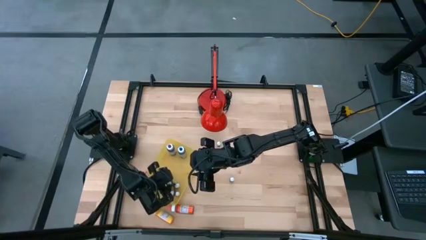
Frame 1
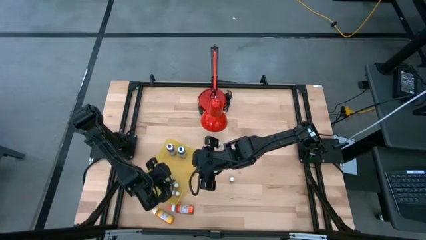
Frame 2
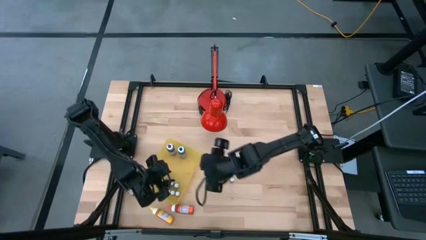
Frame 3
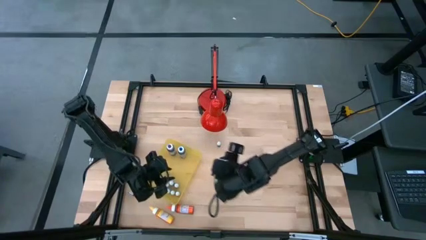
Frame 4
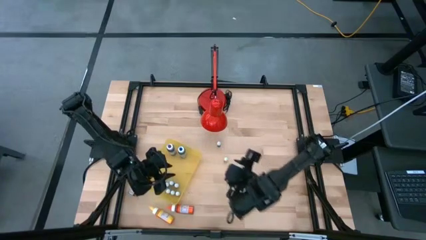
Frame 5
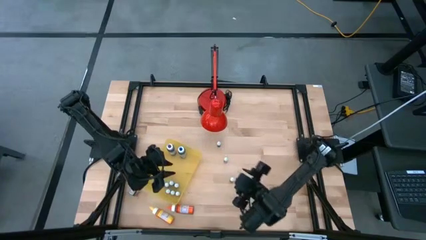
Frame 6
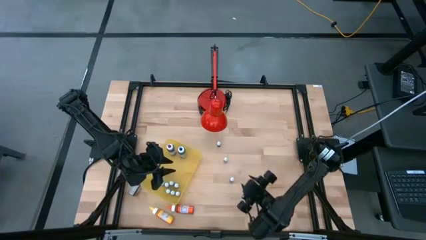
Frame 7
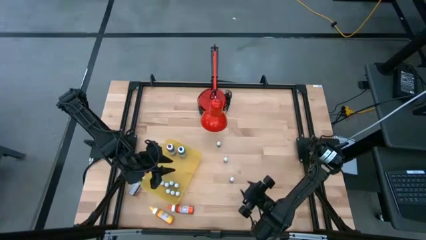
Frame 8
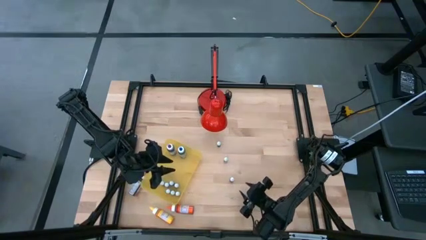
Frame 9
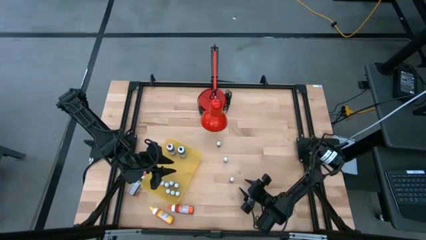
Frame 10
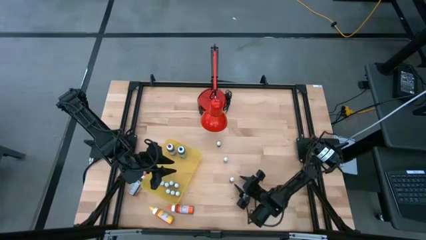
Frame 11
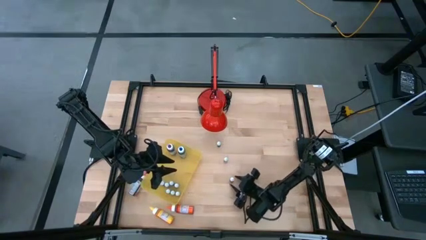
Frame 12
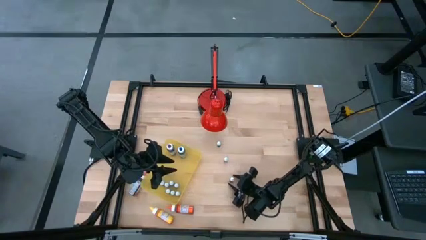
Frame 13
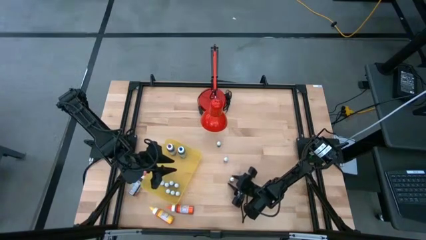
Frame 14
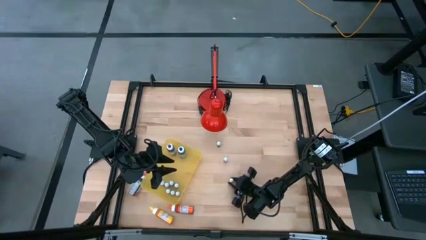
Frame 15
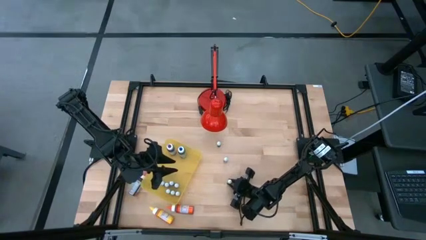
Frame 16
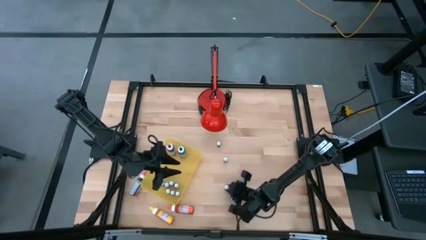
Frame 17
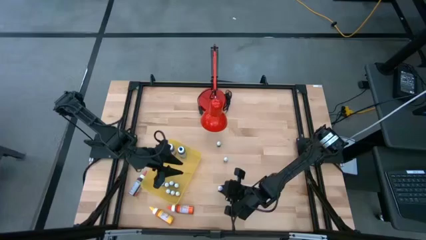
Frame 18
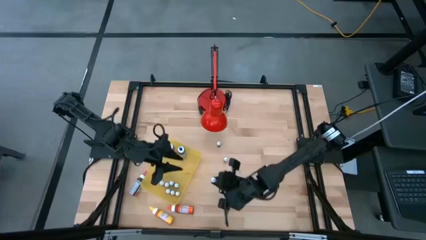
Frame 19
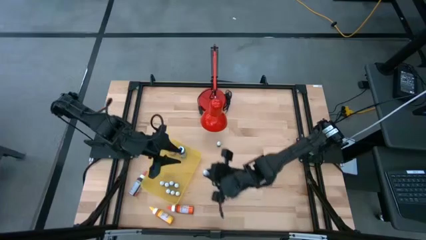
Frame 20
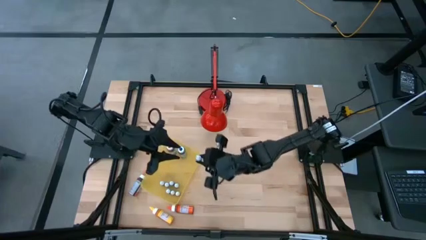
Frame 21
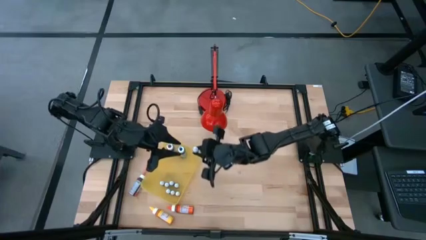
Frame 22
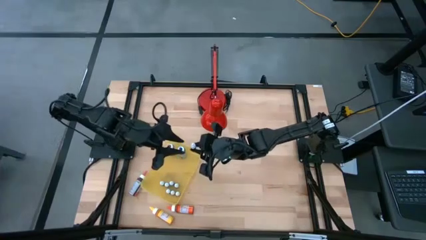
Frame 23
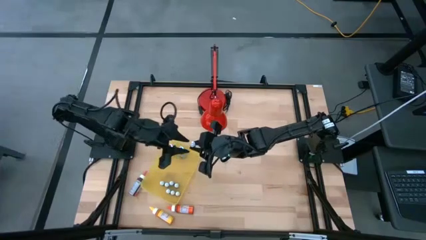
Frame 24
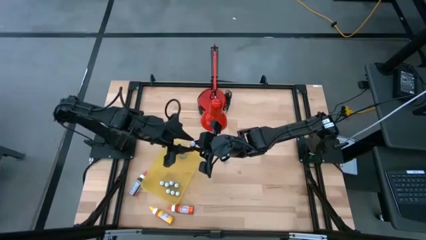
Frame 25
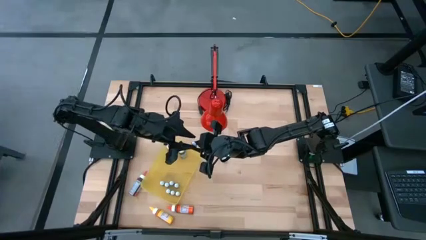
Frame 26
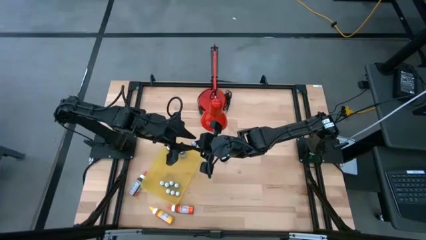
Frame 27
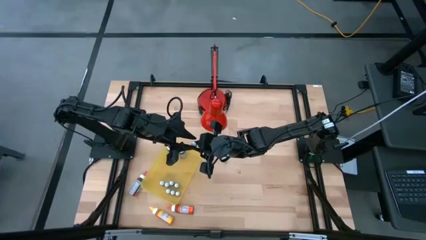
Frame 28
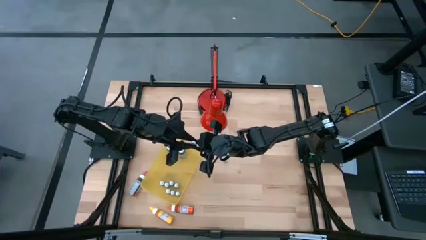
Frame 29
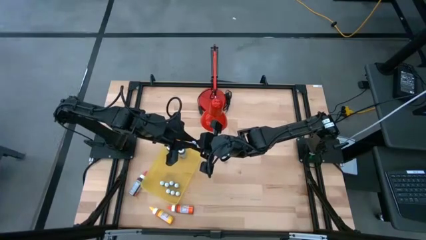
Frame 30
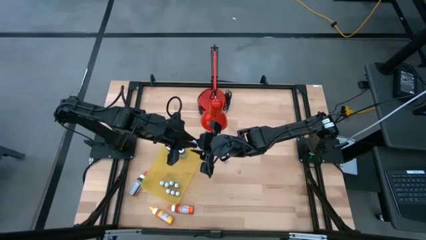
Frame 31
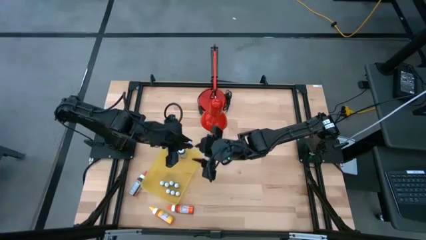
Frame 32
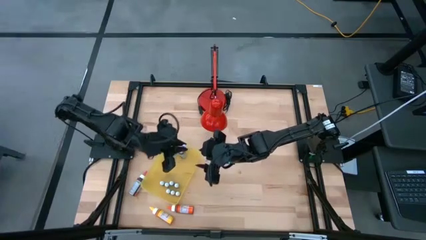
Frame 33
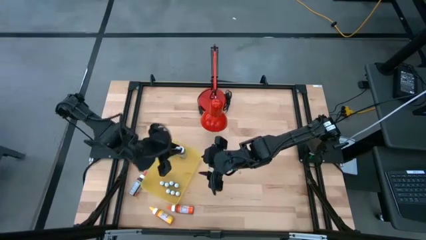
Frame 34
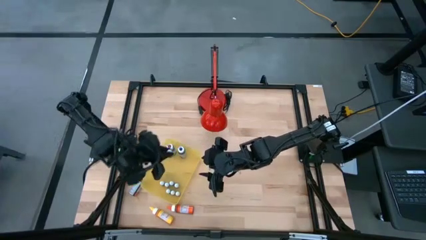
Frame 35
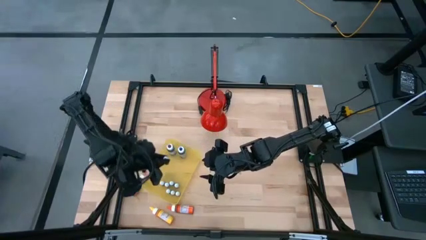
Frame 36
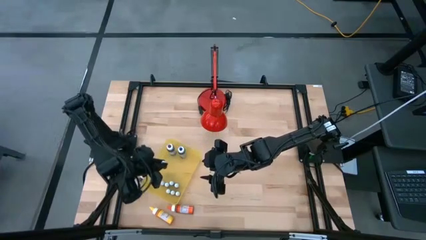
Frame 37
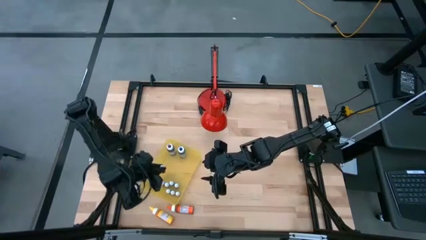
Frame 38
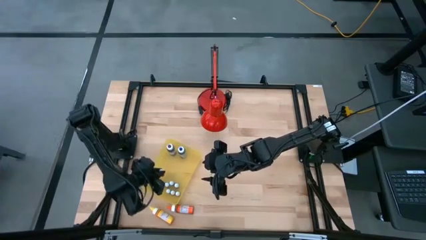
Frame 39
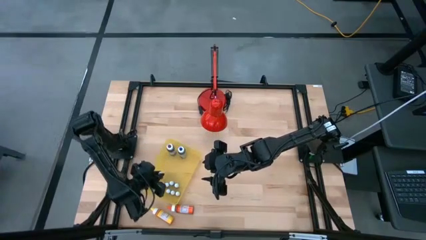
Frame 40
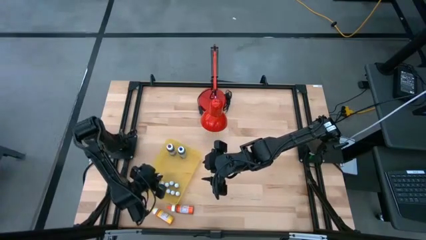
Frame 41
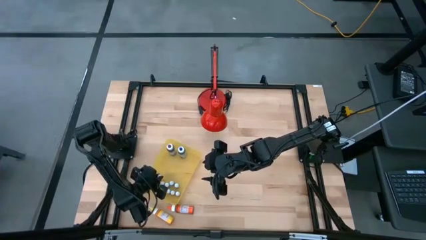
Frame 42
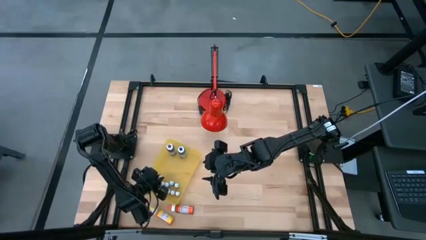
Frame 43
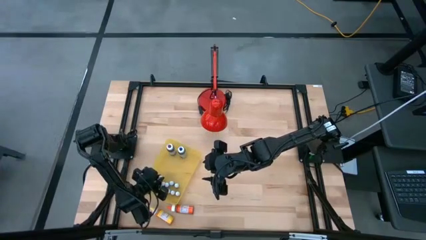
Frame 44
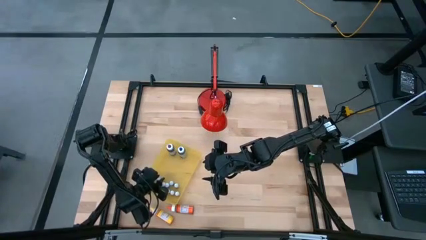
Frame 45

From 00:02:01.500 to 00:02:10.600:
Task: Pick & Place food coloring
Put the small red food coloring bottle into the yellow bin

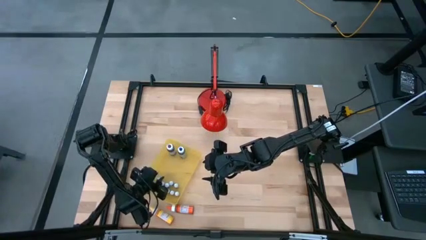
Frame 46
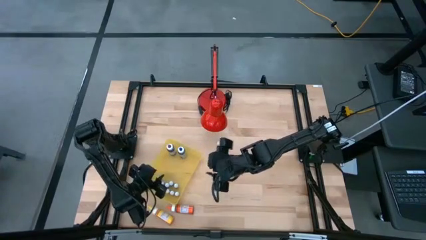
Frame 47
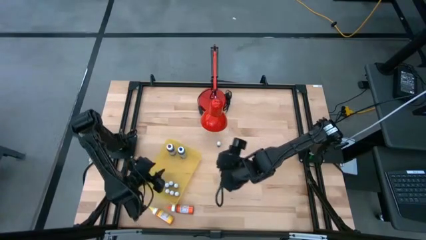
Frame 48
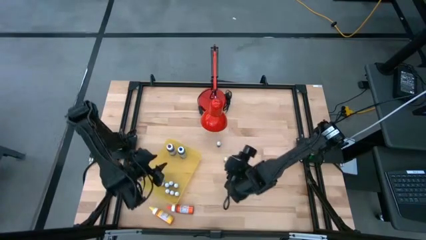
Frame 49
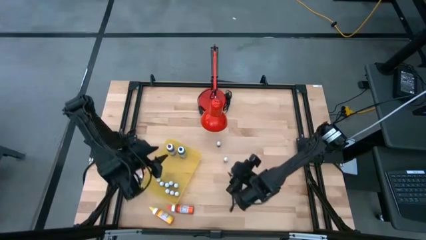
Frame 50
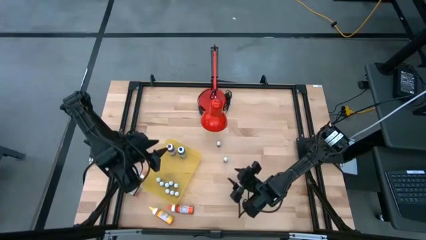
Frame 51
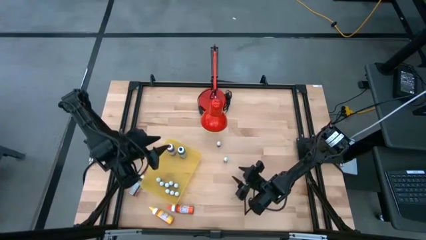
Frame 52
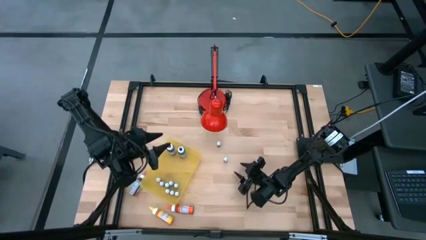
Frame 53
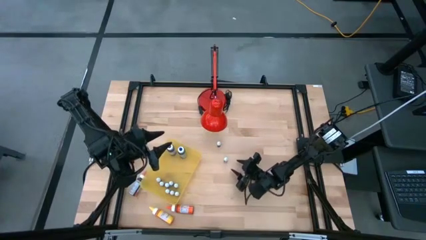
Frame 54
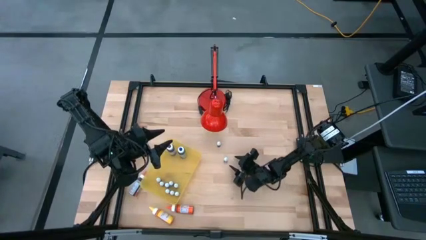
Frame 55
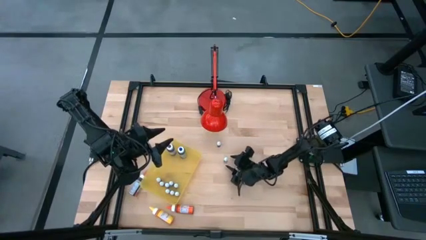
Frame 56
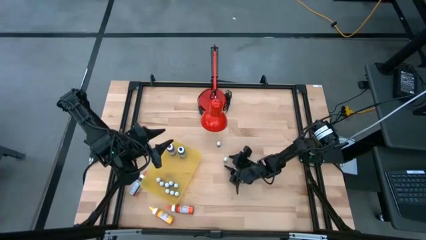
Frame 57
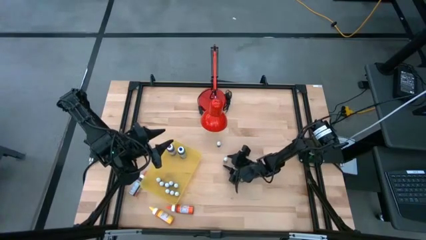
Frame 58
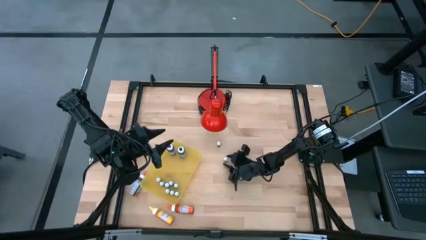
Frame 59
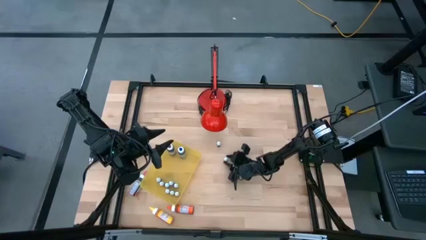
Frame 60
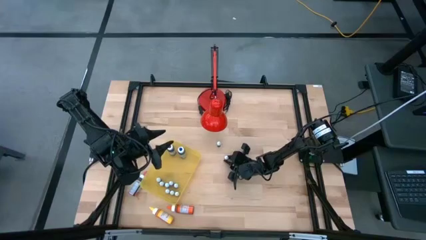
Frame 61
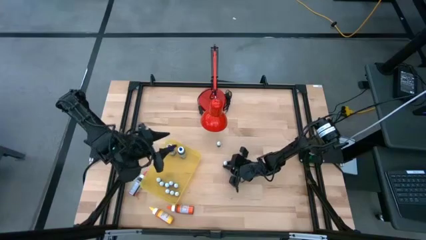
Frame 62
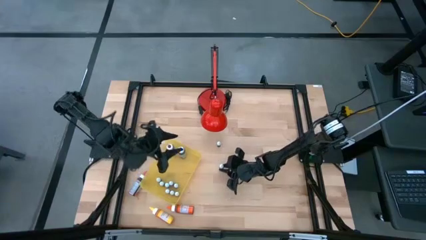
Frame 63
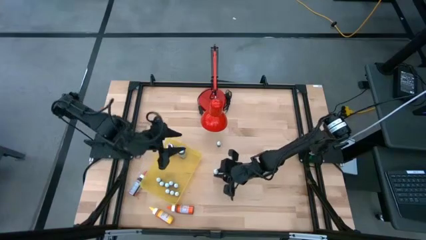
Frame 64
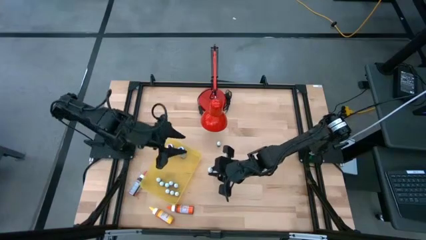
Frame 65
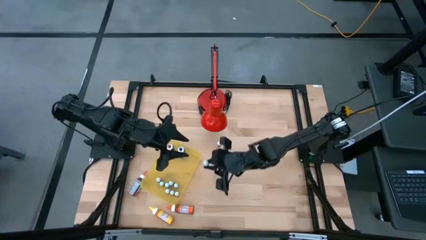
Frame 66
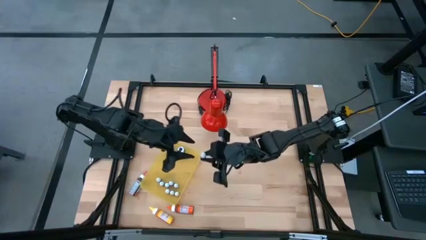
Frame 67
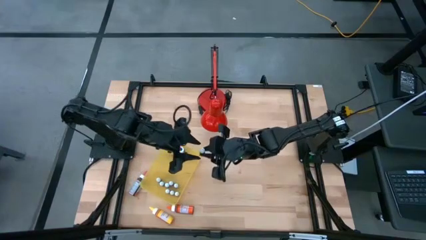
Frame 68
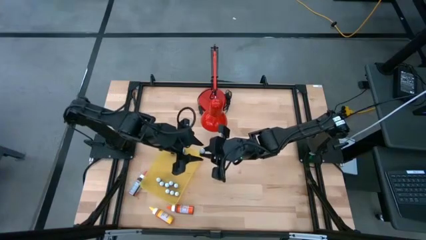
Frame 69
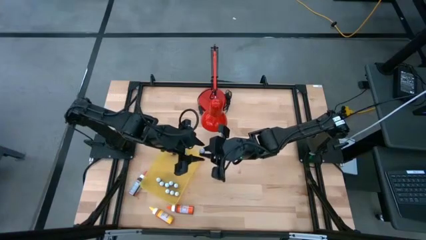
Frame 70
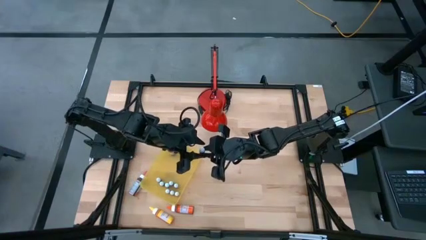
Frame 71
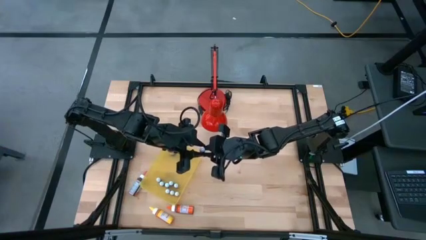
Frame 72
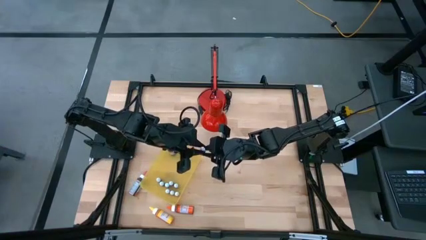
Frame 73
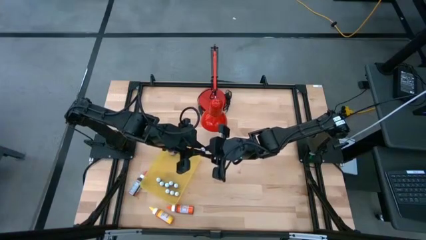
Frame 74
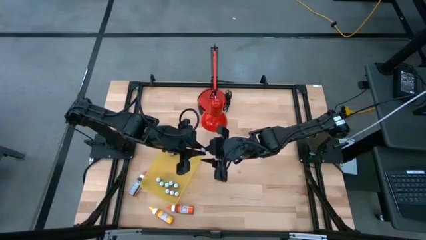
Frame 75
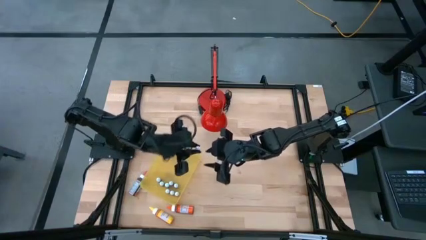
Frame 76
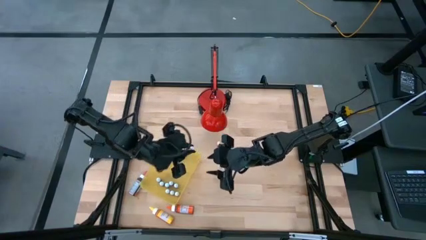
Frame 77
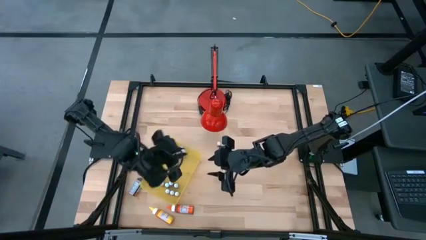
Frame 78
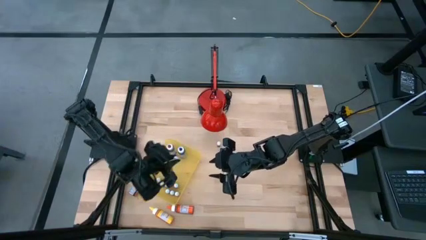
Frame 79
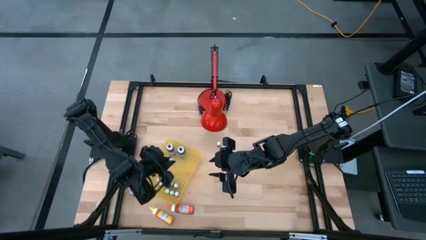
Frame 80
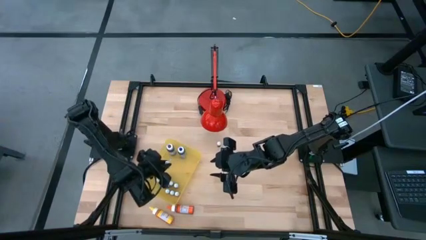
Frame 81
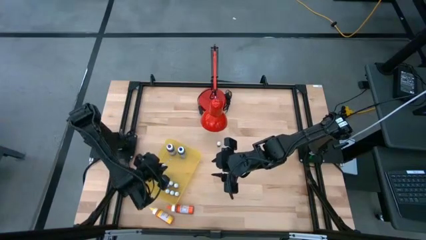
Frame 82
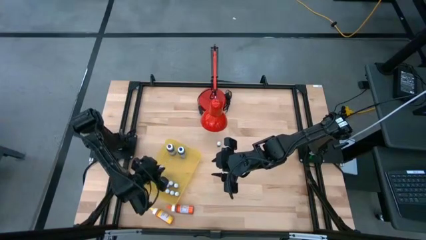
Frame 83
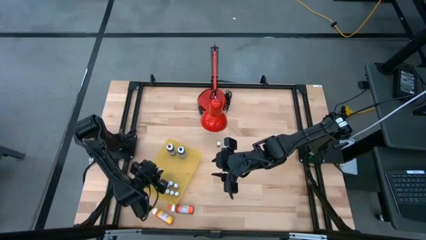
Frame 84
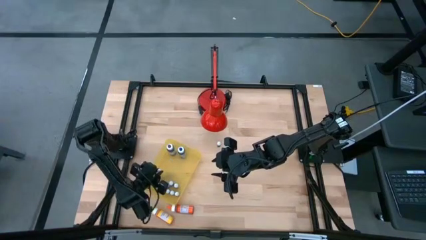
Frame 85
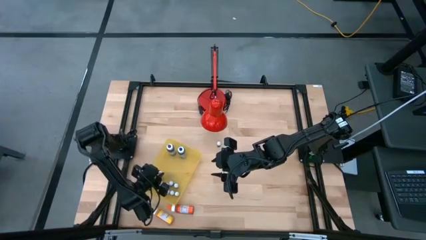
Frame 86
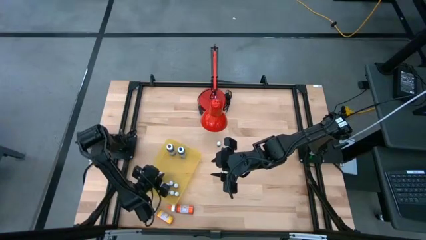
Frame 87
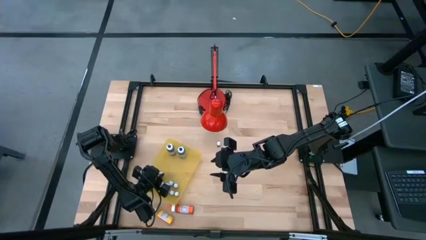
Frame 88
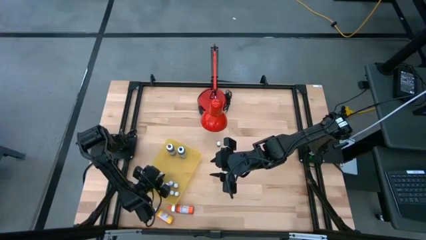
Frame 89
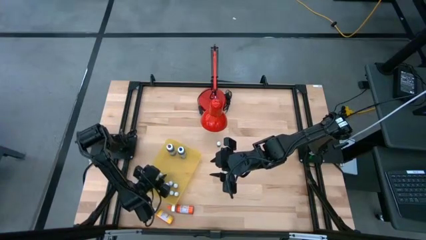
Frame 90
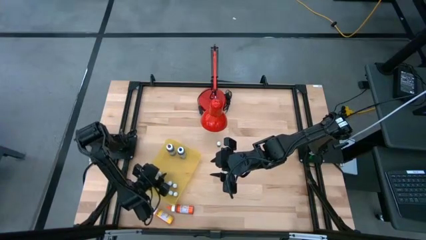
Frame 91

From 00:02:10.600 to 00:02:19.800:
Put the small purple food coloring bottle into the yellow bin
